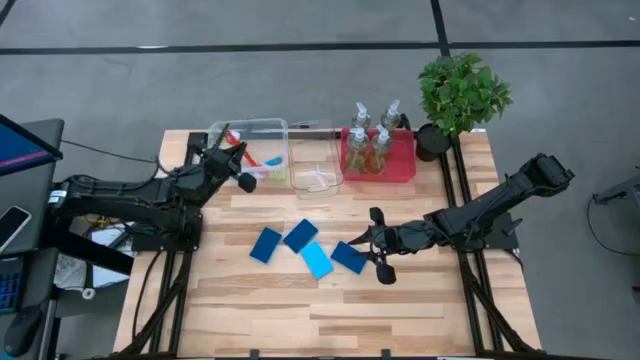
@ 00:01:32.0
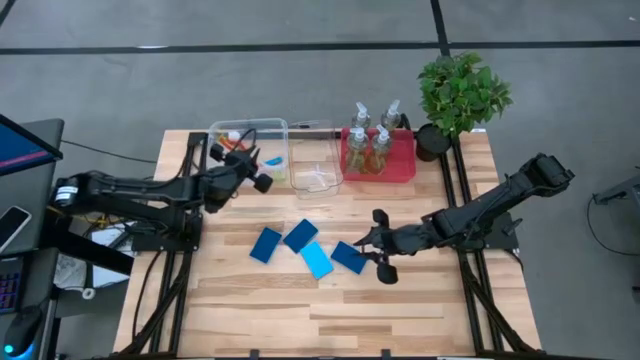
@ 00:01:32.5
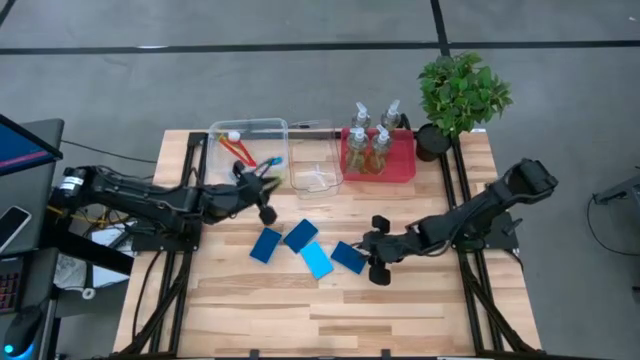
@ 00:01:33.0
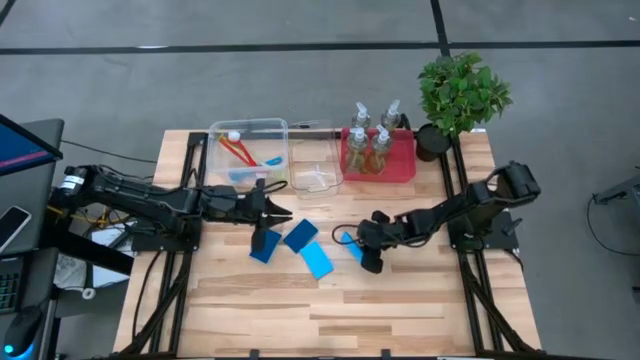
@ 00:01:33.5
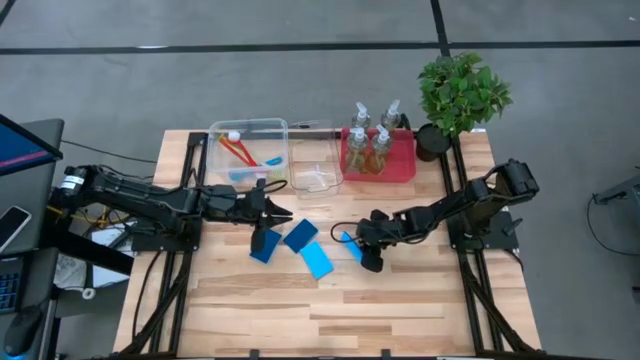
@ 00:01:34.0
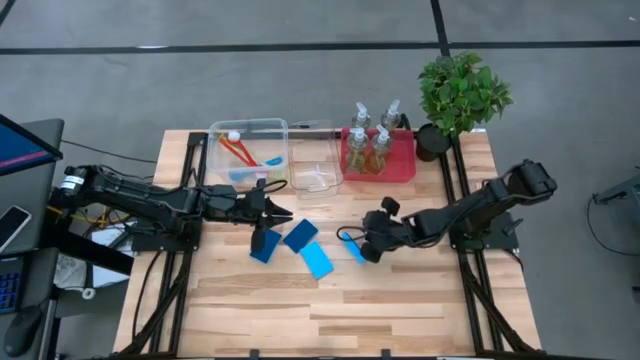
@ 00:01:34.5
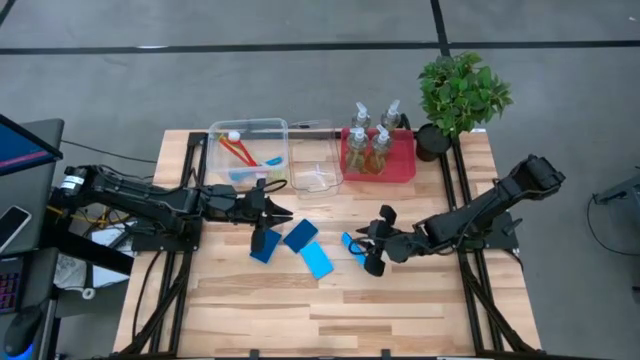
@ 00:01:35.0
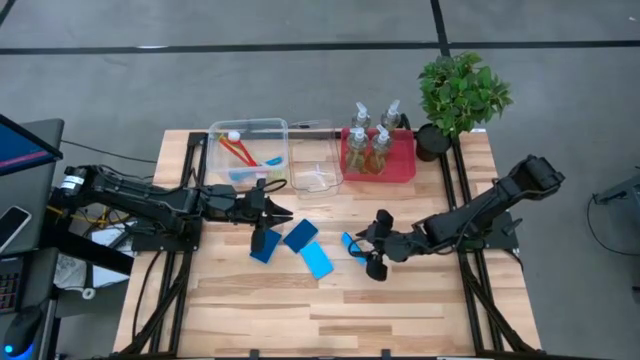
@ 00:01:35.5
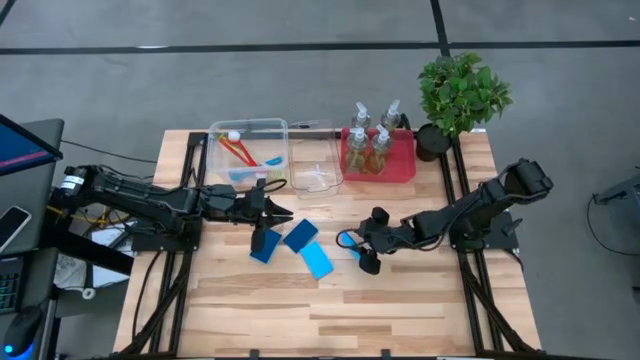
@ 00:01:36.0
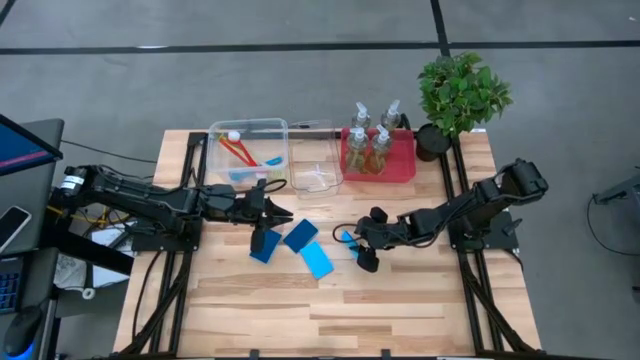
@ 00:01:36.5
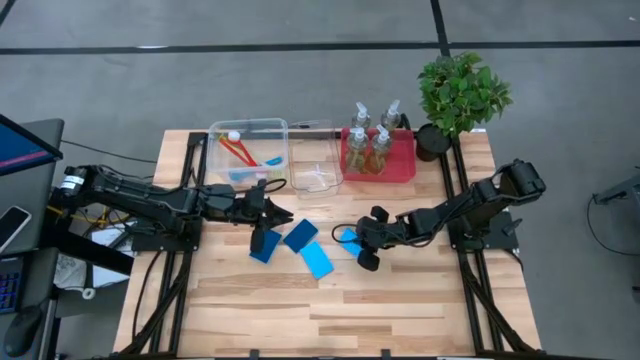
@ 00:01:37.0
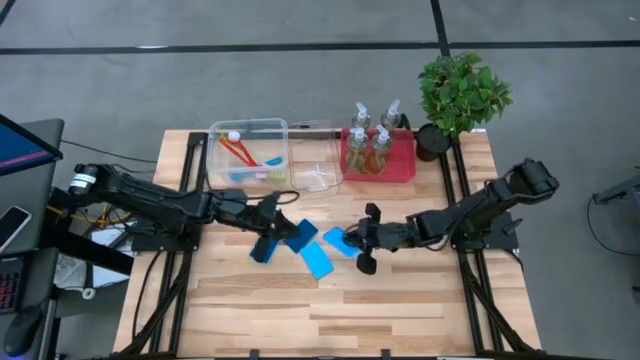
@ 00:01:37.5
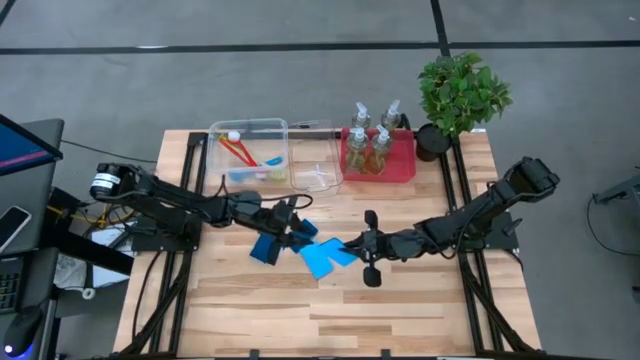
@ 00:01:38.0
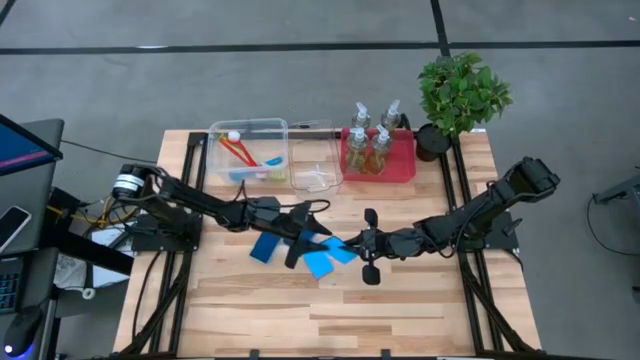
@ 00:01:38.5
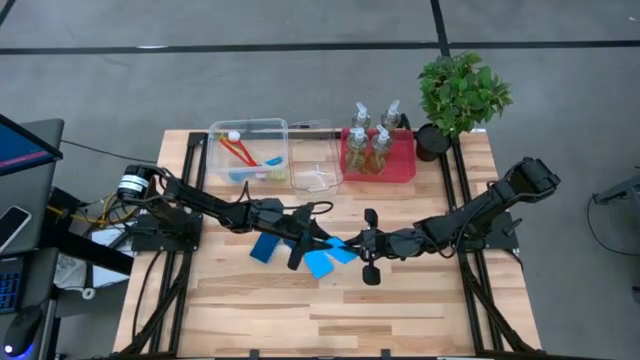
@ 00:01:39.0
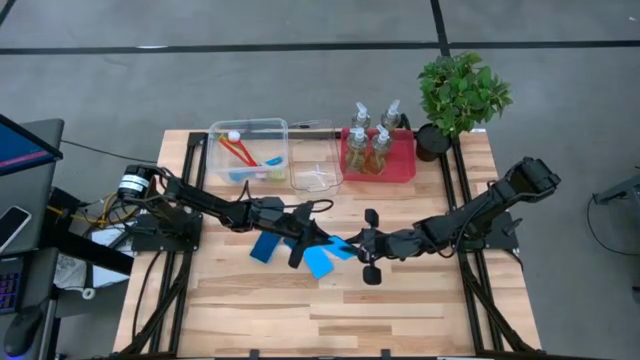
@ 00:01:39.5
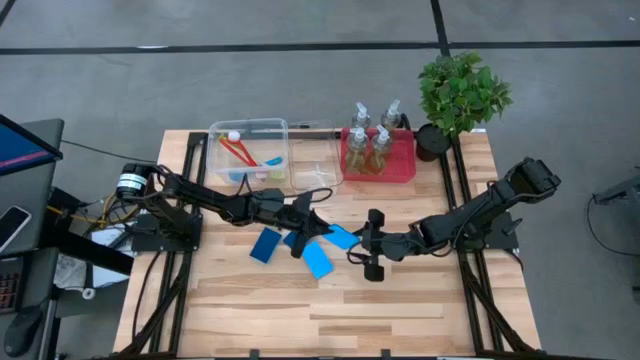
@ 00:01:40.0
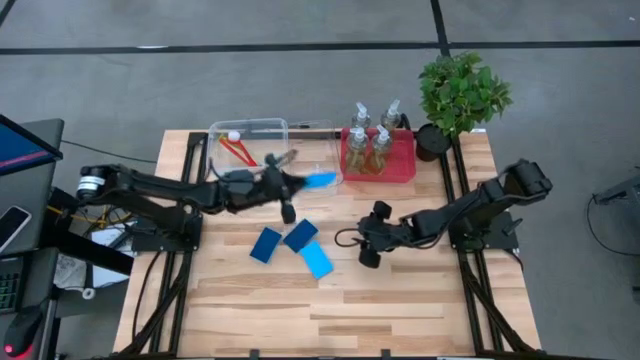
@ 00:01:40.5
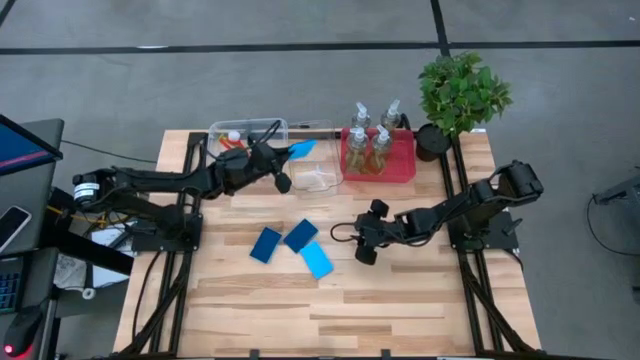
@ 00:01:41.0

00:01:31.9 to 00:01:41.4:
Task: Pick & Place Kitchen Sink Supplies
Put the blue sponge into the transparent bin

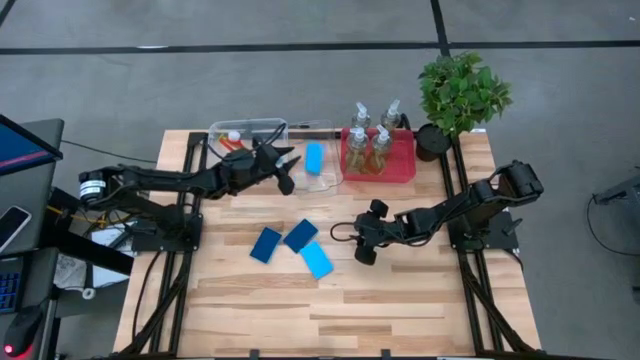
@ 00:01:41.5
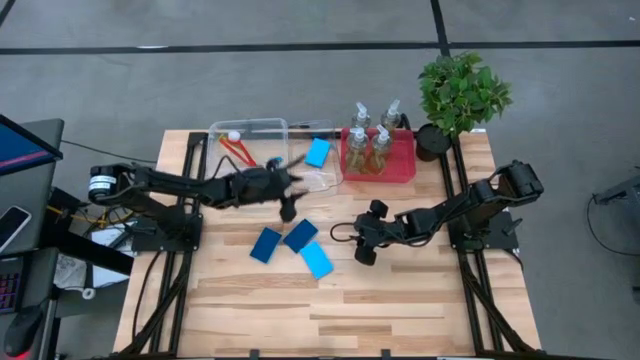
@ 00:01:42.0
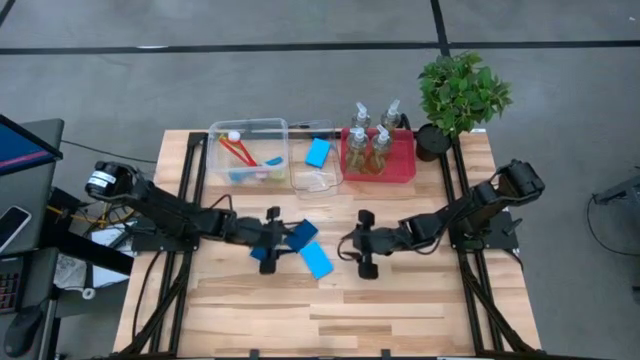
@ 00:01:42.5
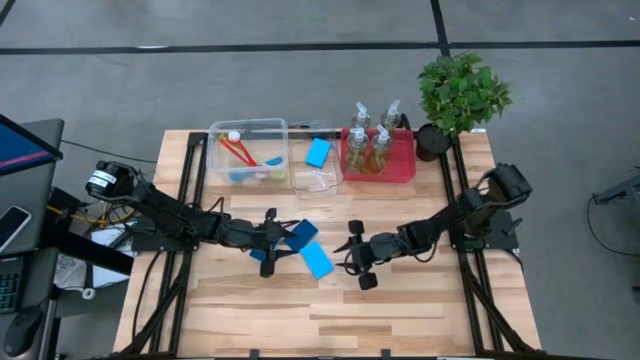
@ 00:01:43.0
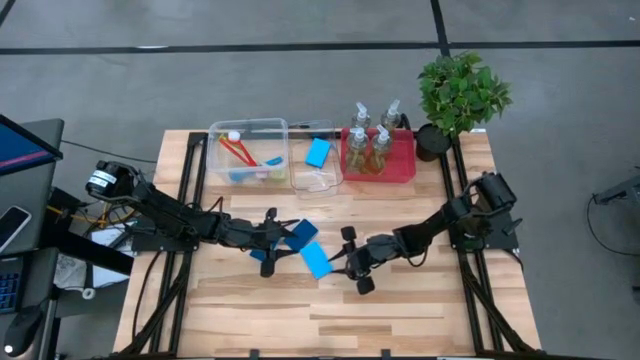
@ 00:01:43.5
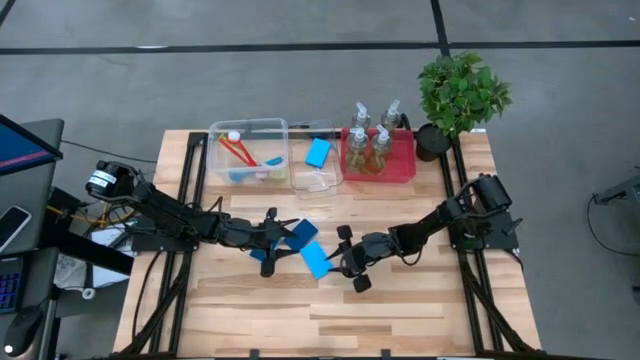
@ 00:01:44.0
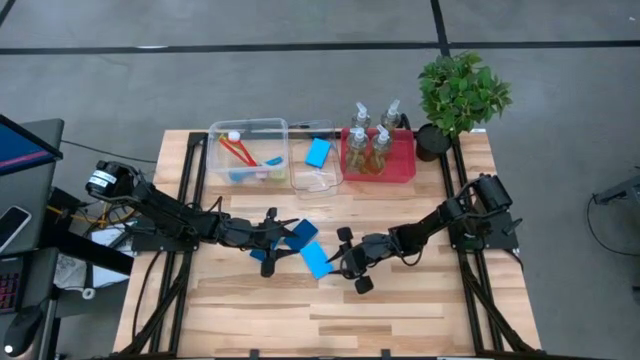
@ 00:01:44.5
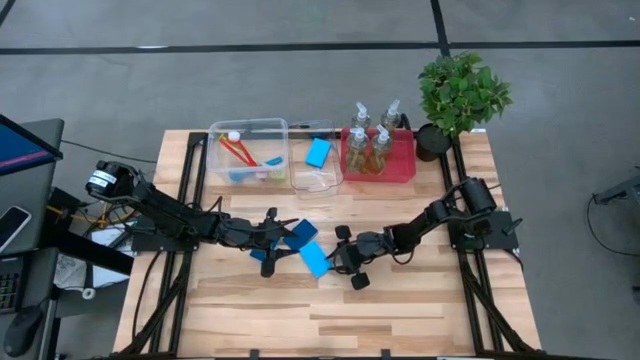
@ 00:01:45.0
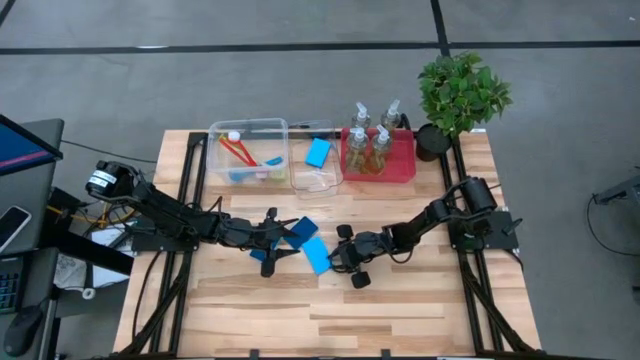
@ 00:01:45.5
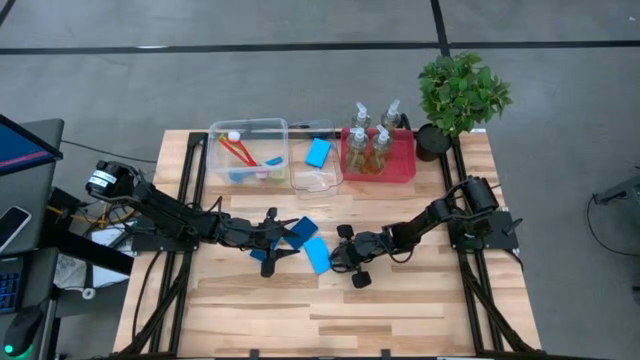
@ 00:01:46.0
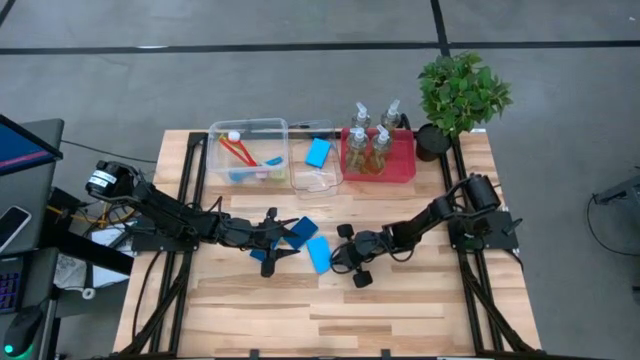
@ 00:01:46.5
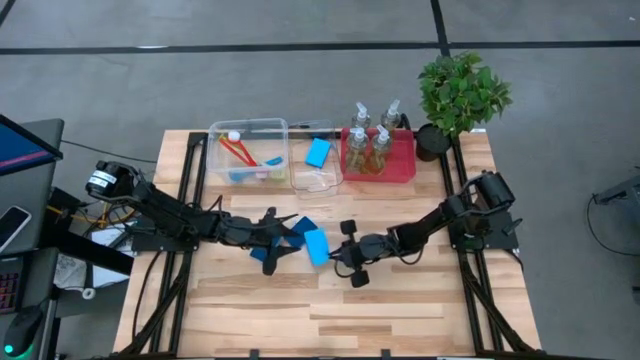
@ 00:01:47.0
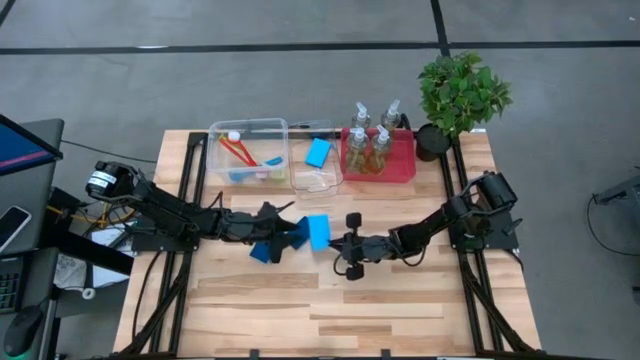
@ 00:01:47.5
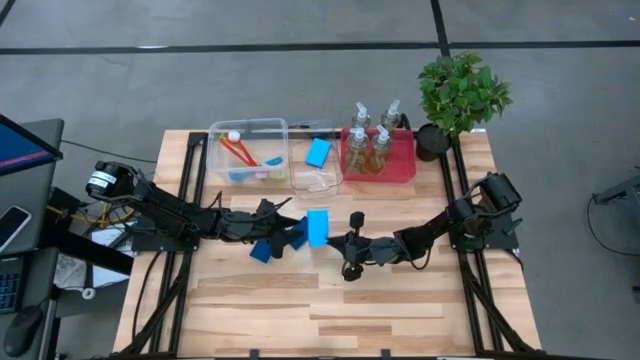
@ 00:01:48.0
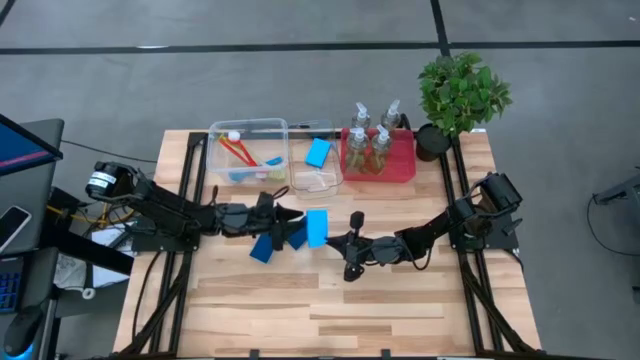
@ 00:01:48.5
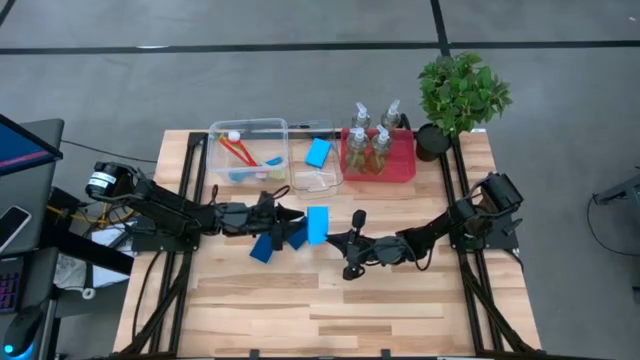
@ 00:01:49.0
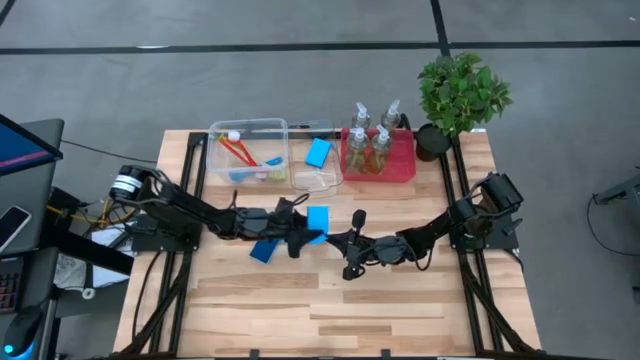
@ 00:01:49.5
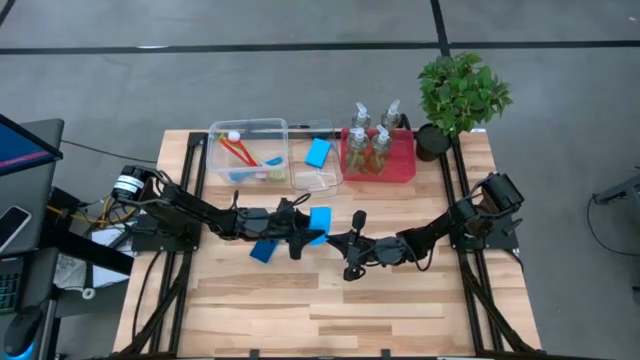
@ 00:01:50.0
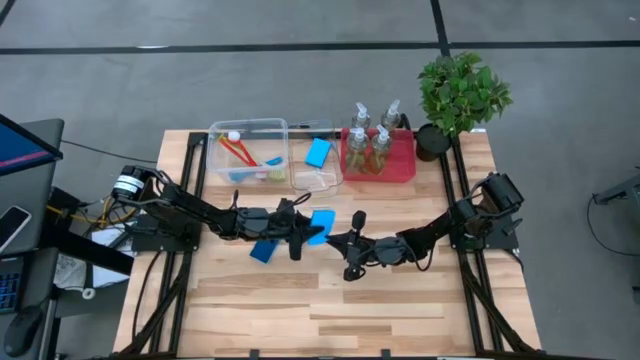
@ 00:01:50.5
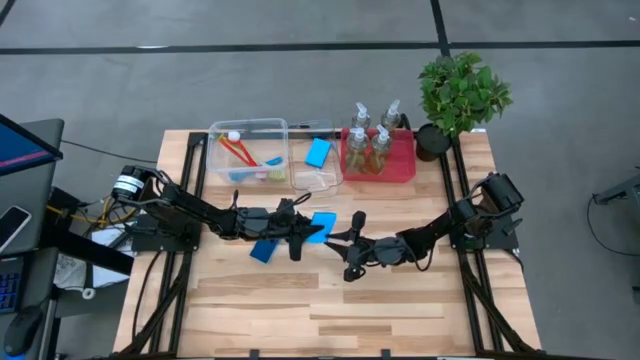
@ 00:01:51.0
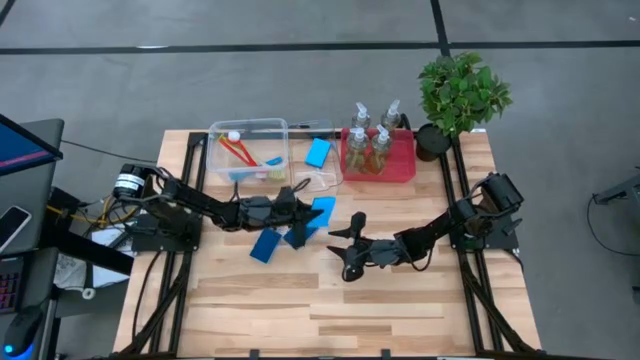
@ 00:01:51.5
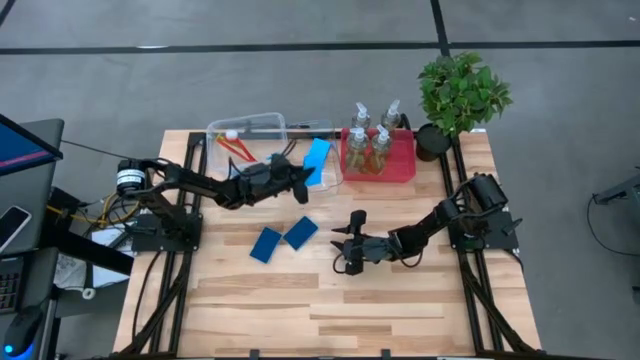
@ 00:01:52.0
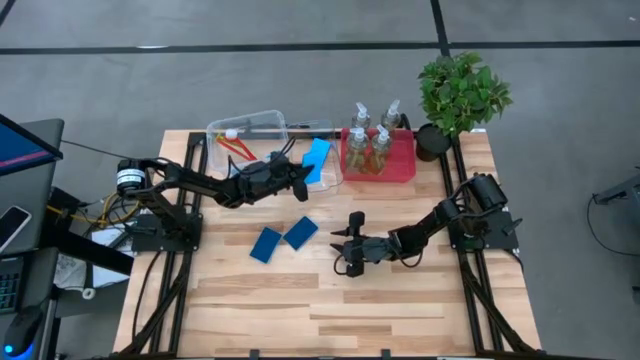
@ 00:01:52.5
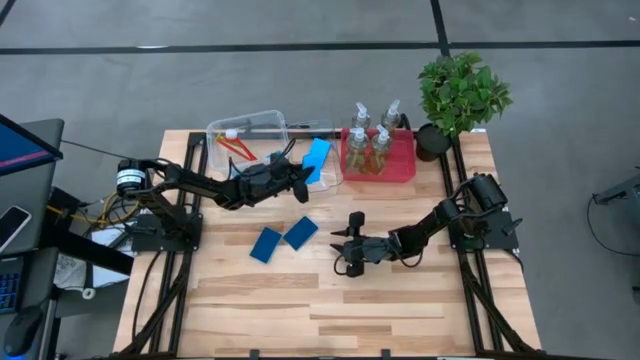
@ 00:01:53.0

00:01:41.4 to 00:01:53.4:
Put the blue sponge into the transparent bin
